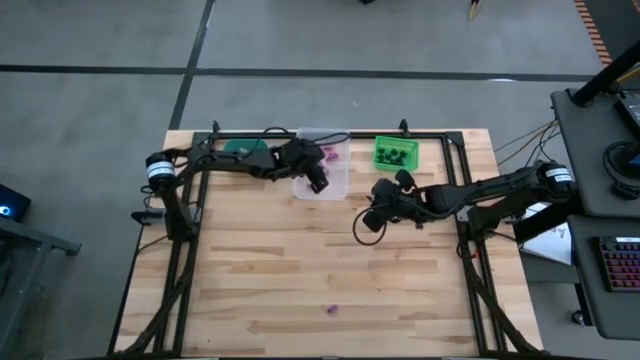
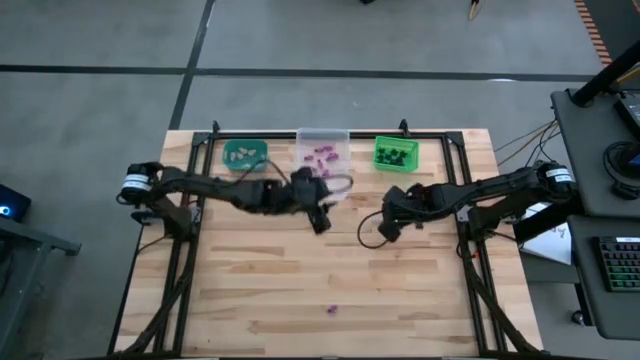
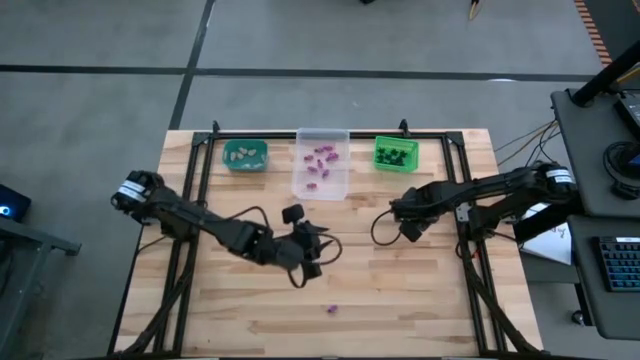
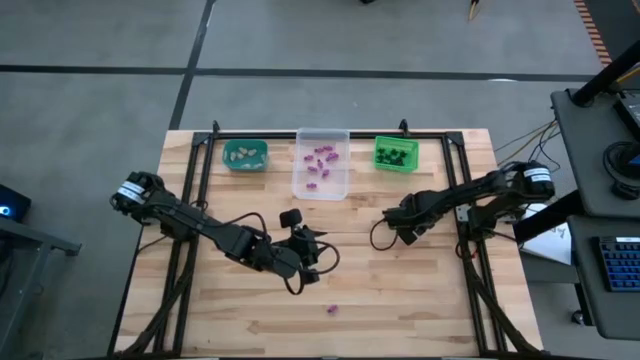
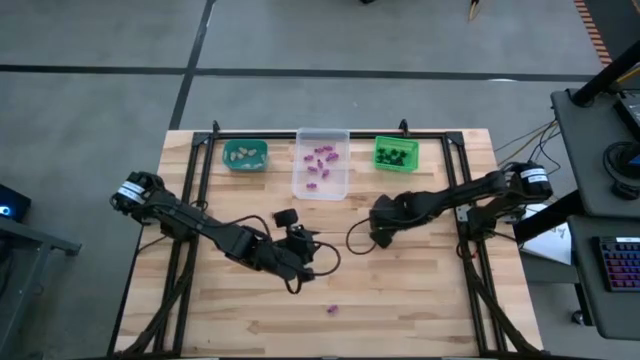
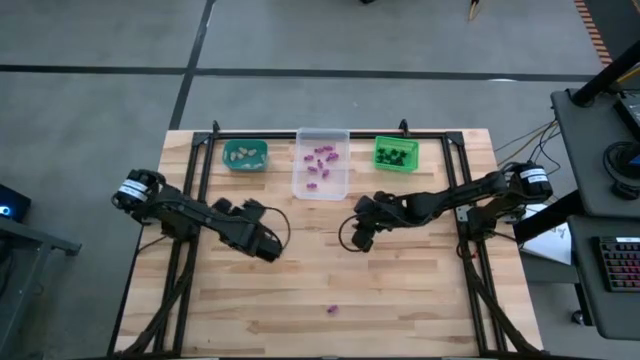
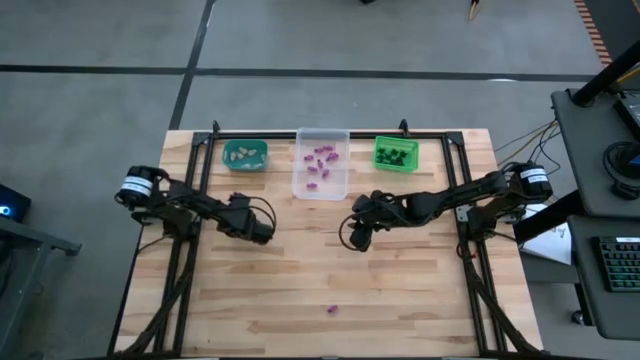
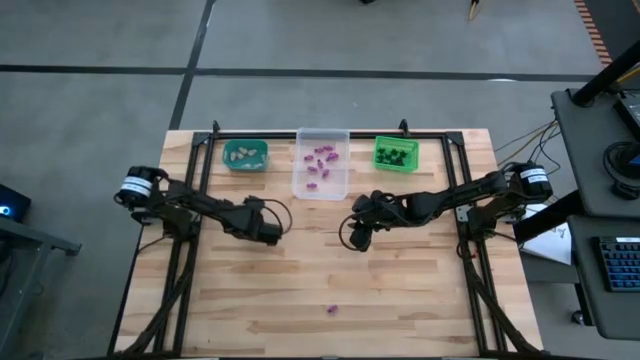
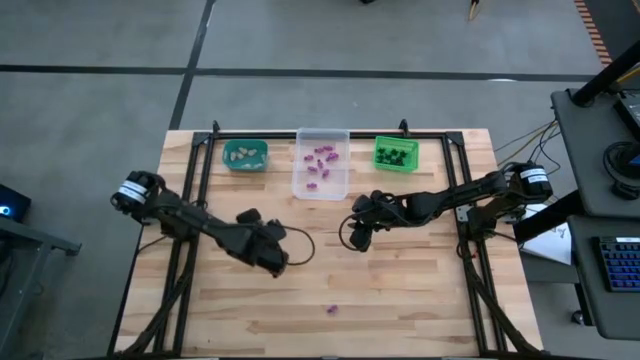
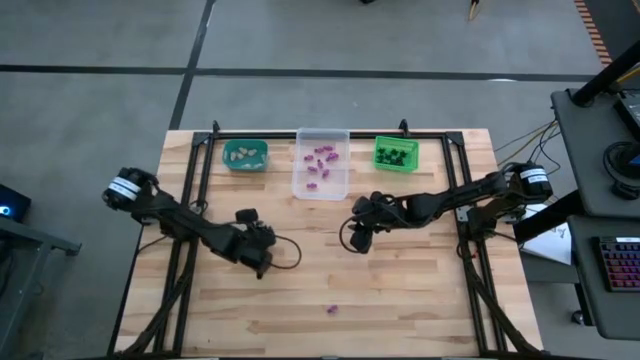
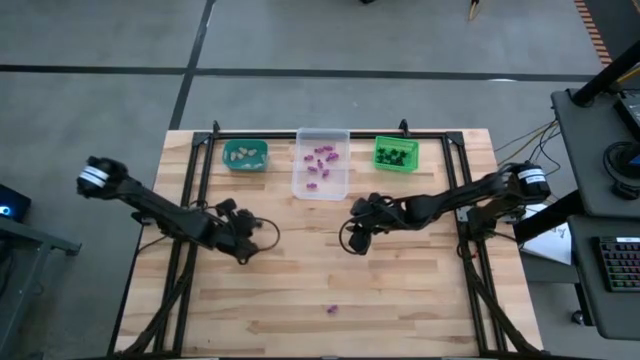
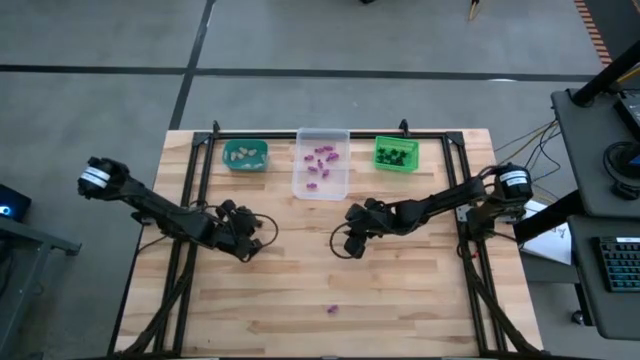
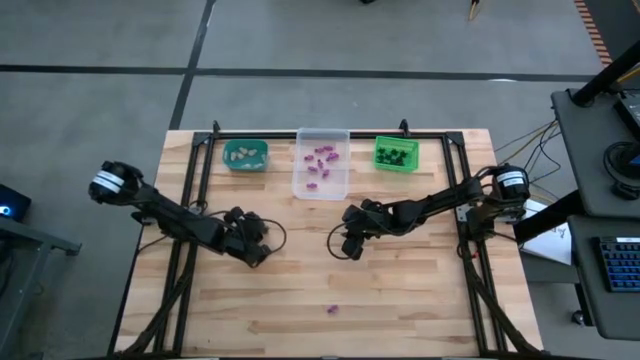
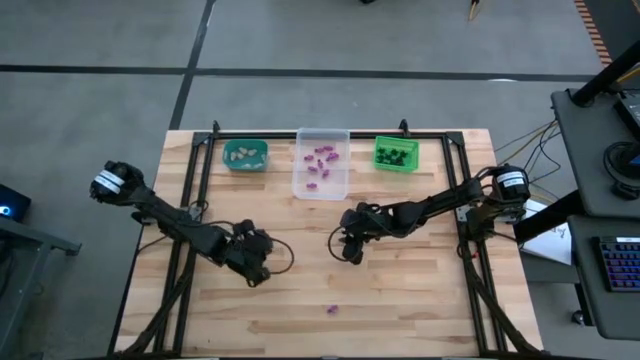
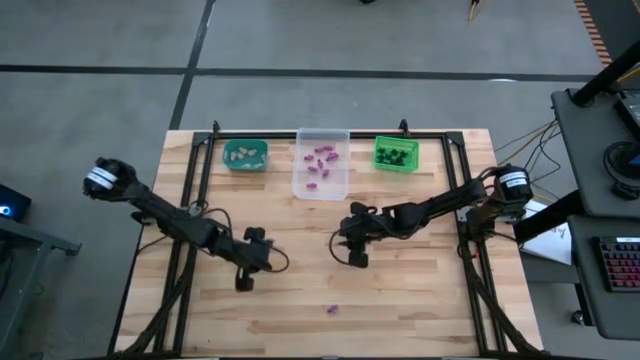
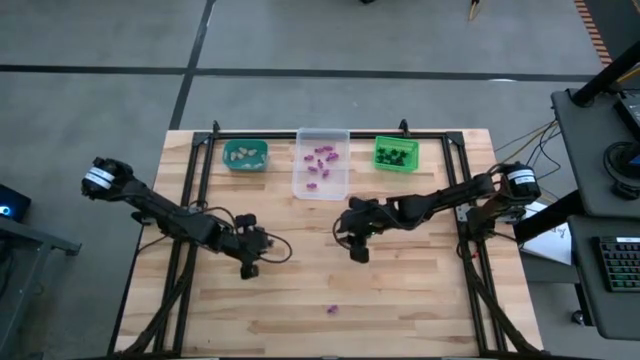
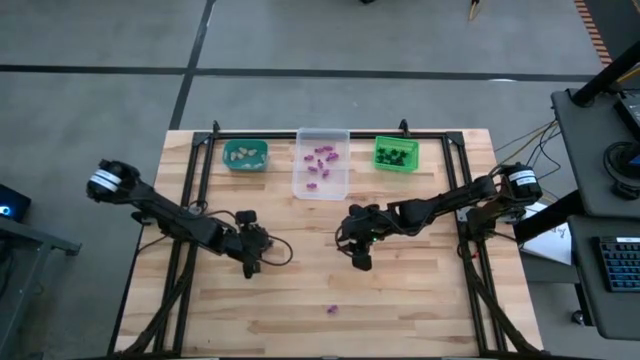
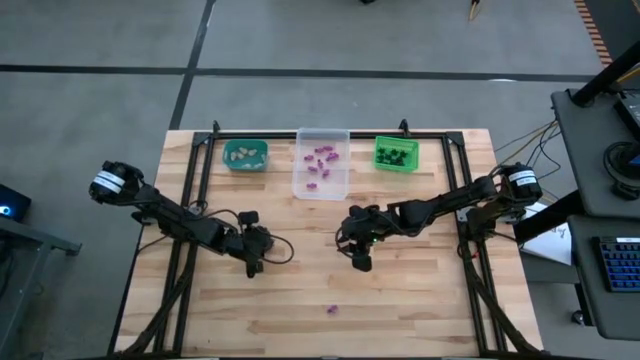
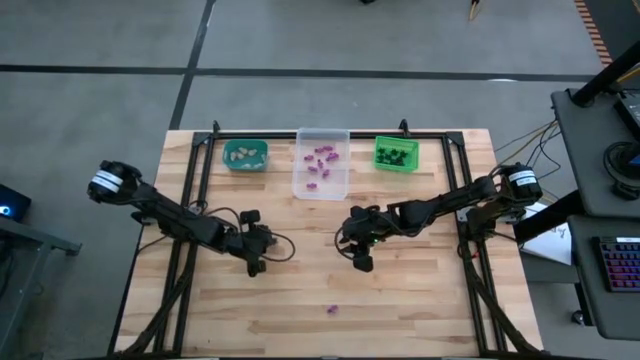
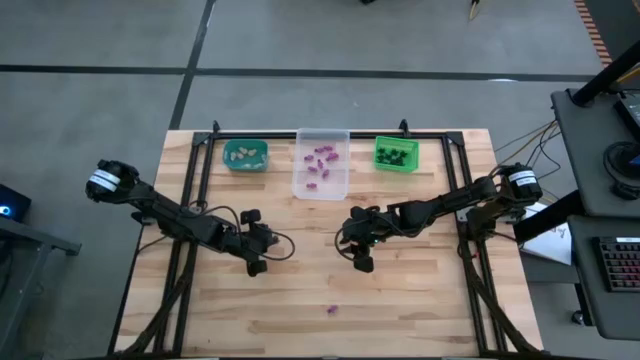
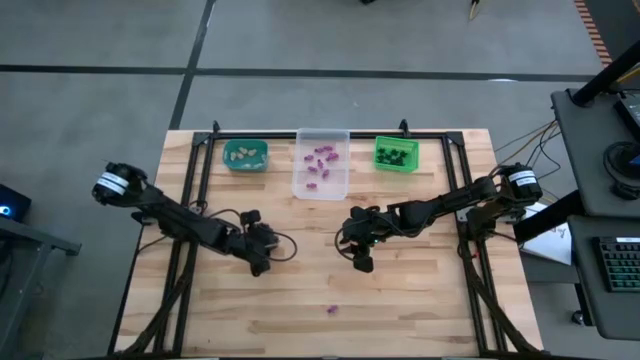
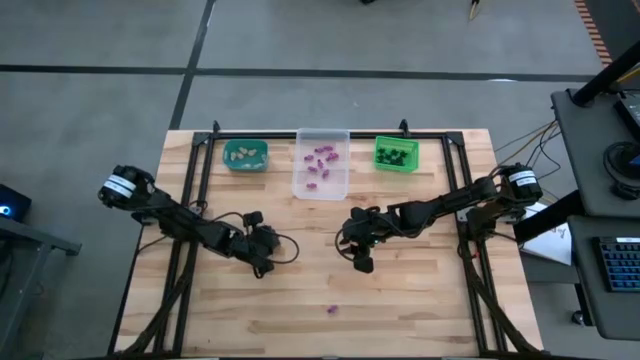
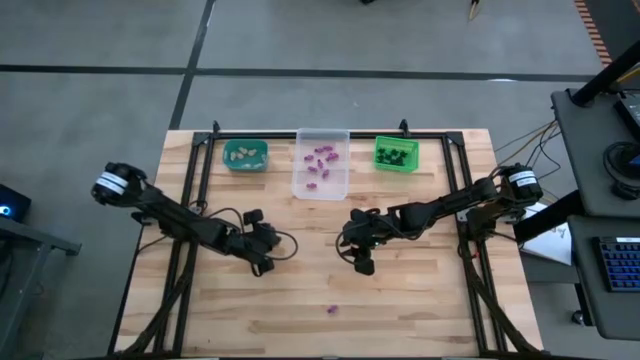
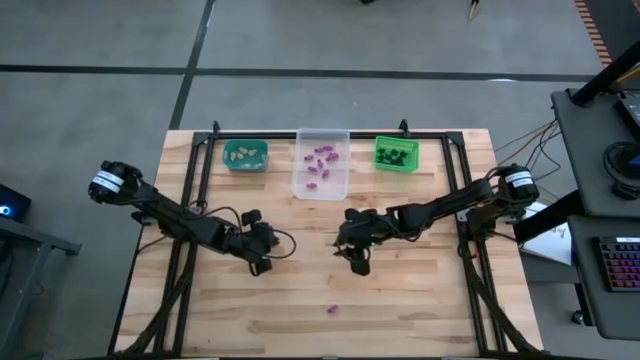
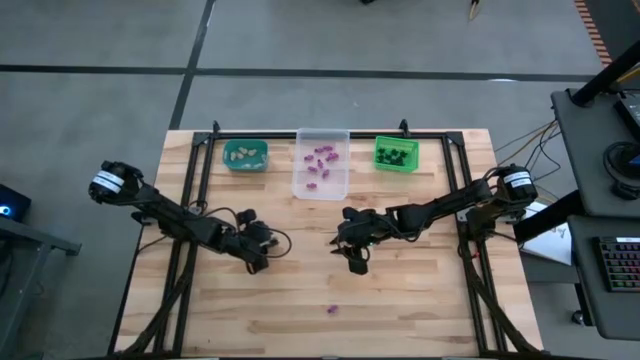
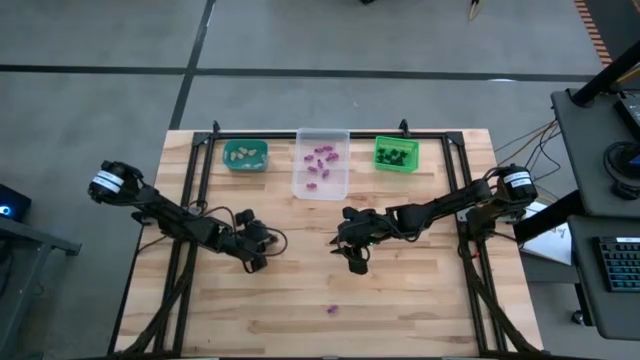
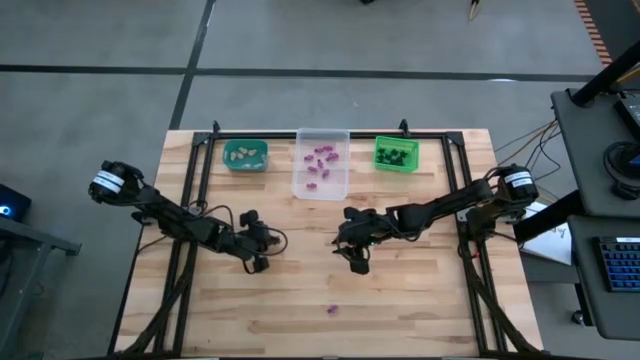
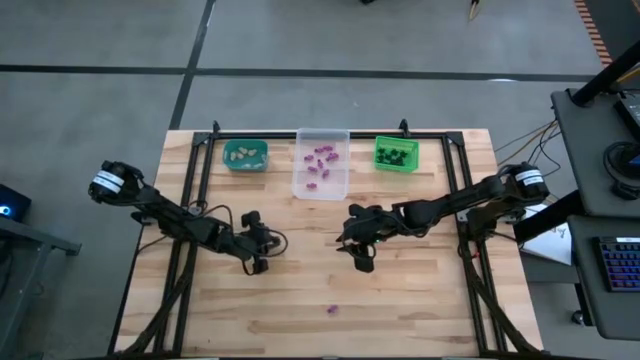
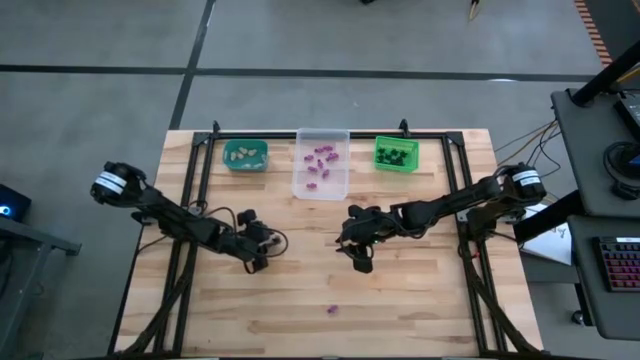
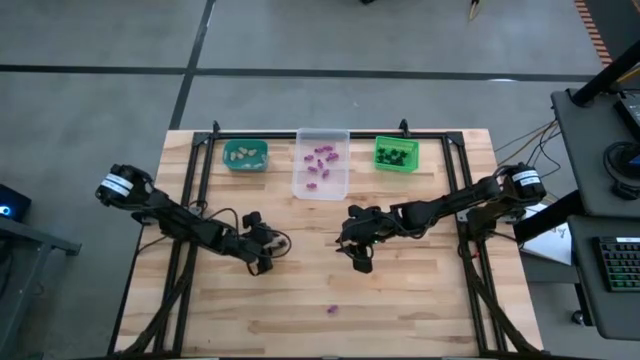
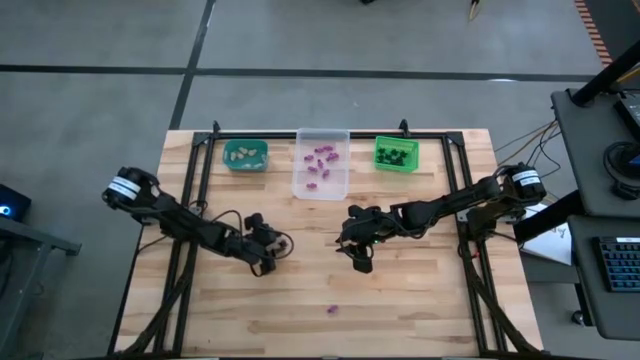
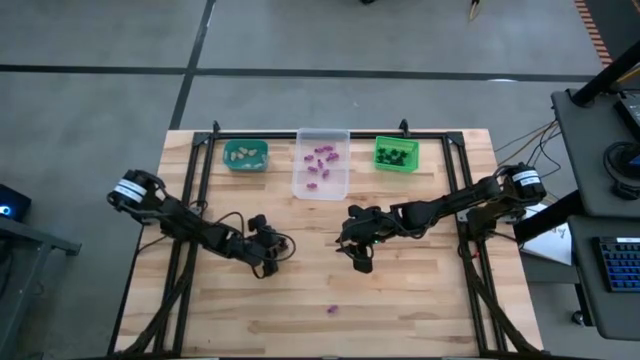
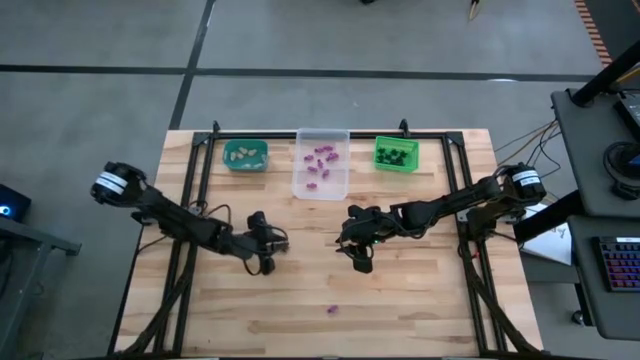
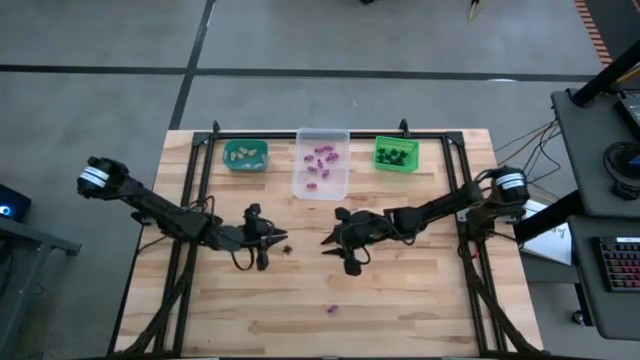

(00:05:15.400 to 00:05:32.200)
Task: Sort Halloween decoration
Put the black spider toy into the green bin

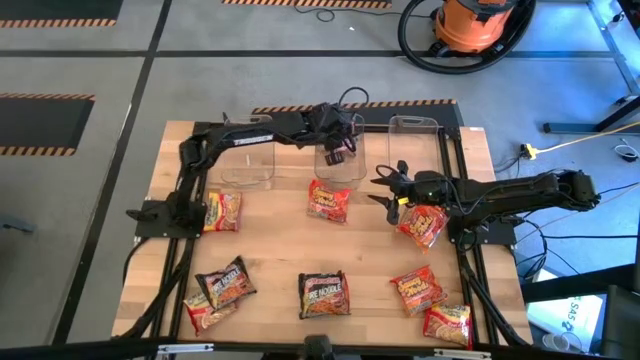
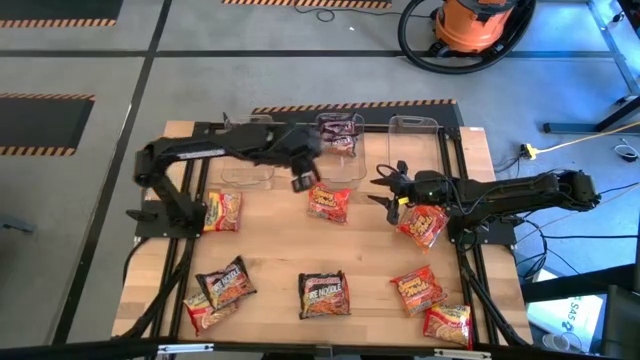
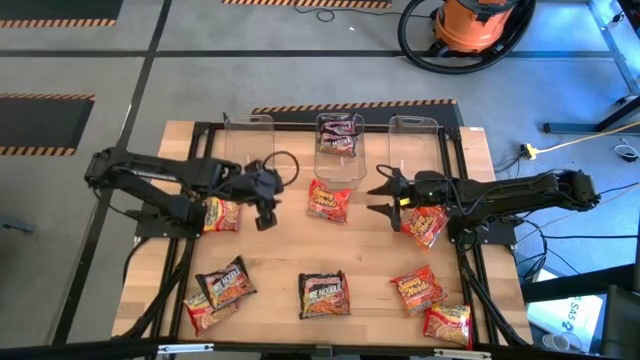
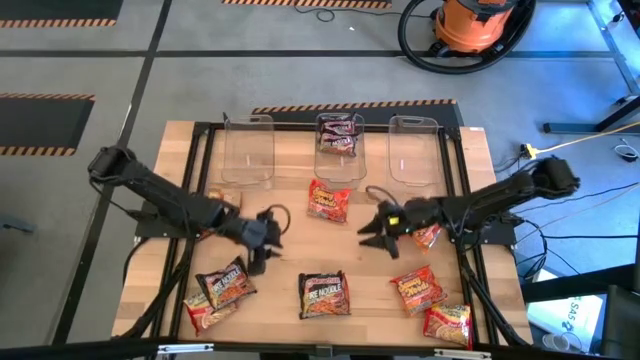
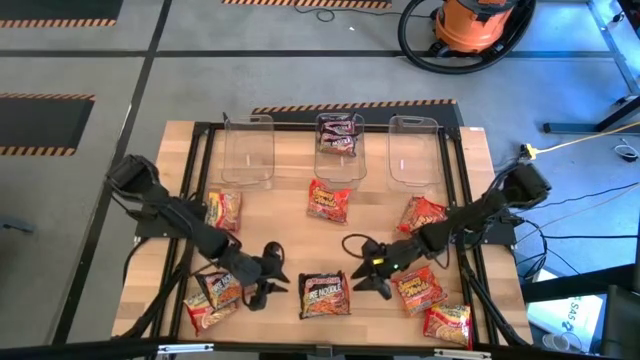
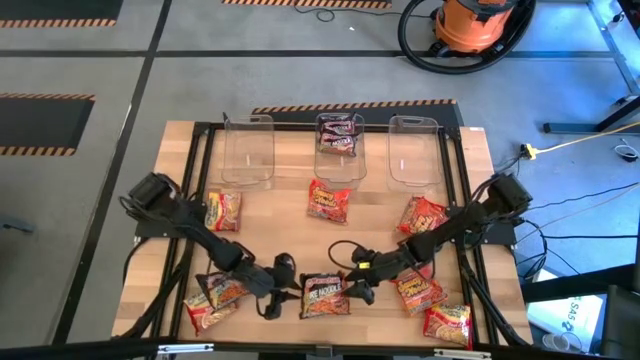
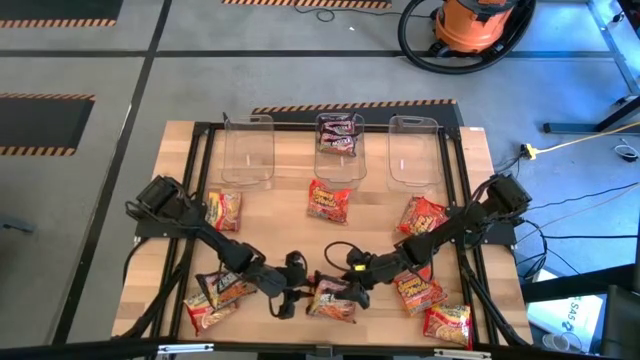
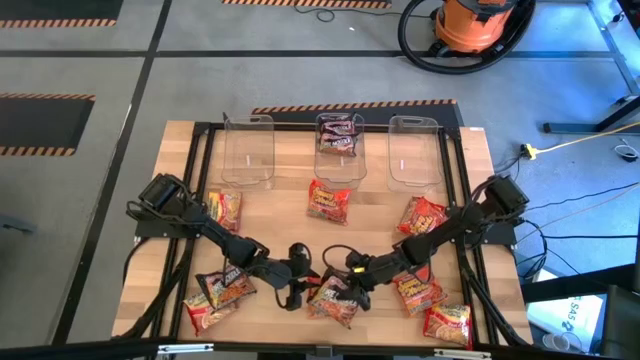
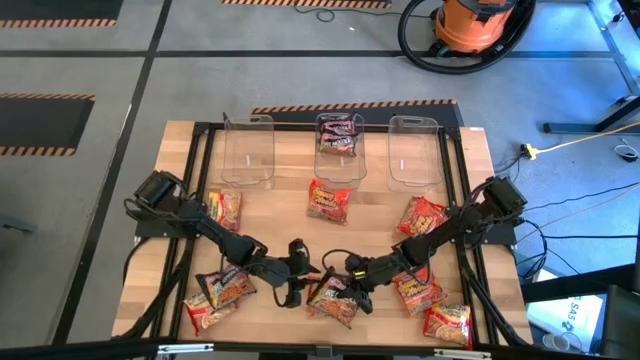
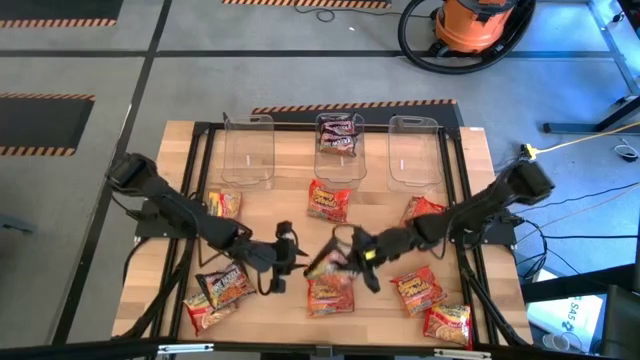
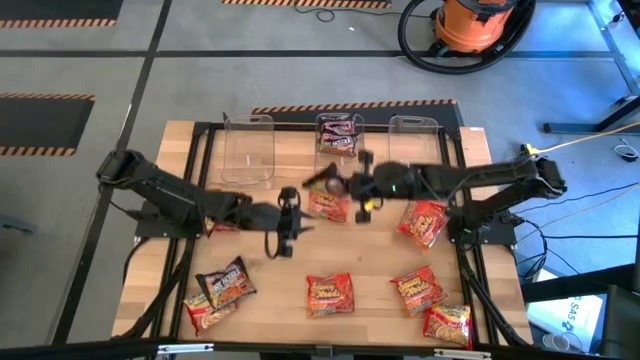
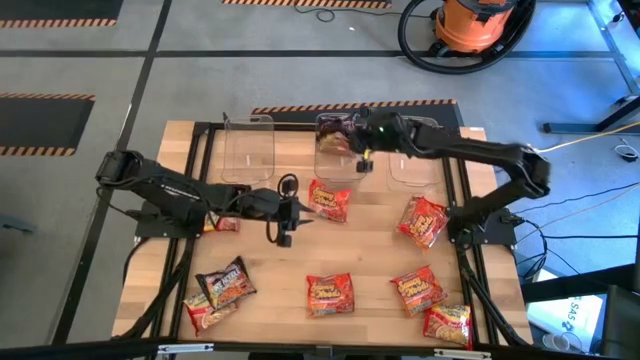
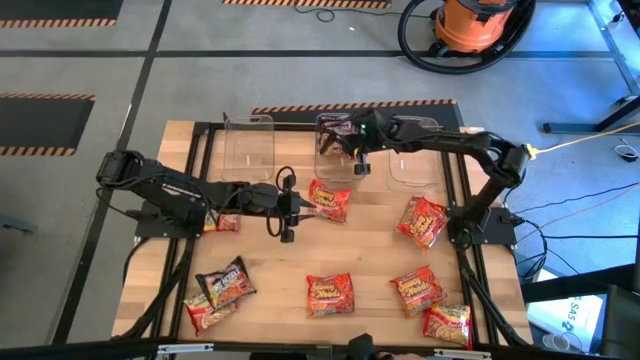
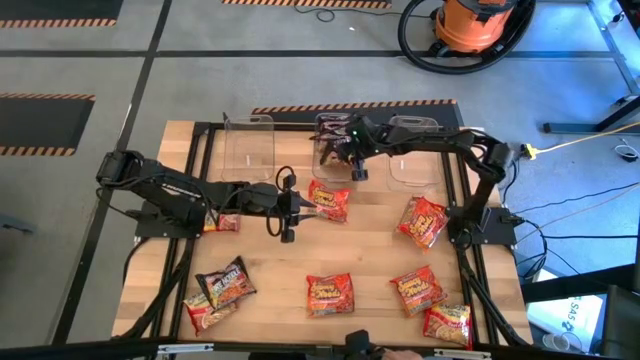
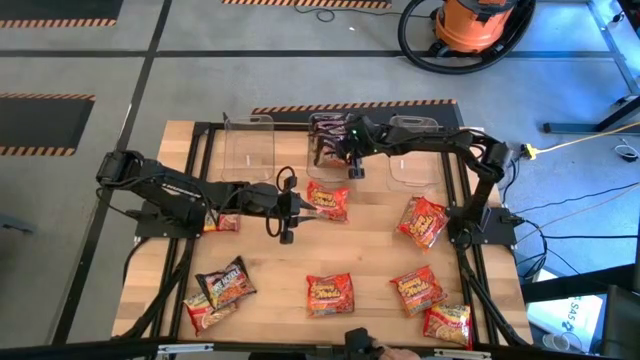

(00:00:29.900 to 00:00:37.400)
Task: Sort Maruchan noodles
Put the black noodle pack into the middle transparent bin
